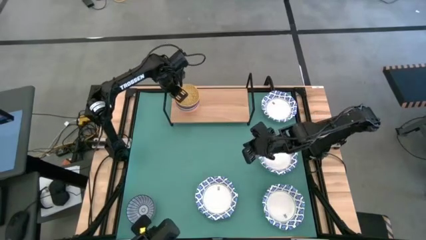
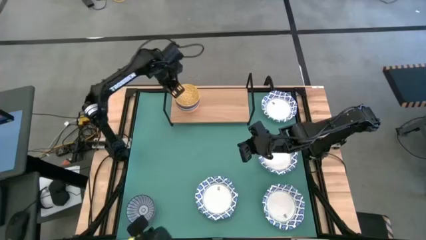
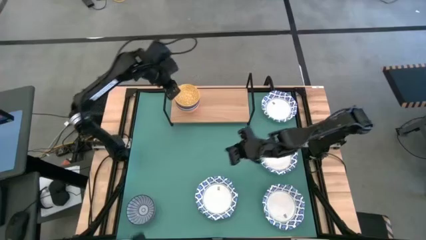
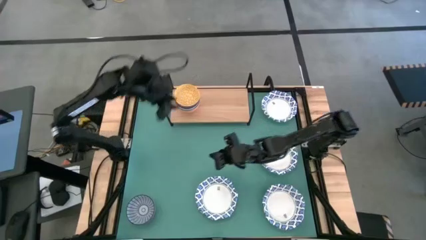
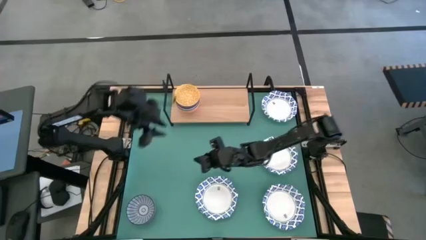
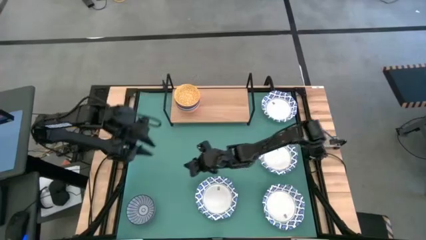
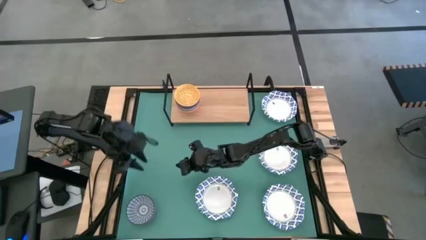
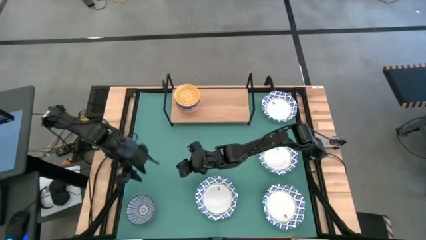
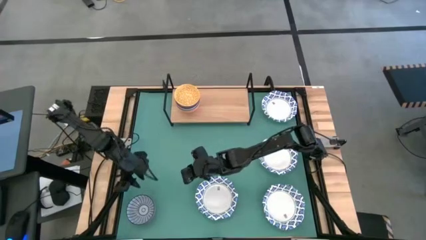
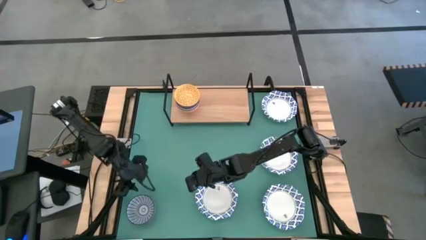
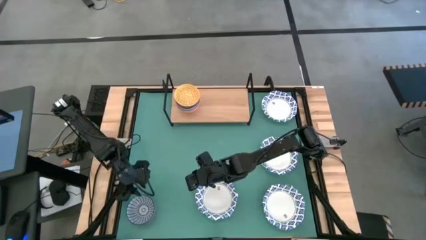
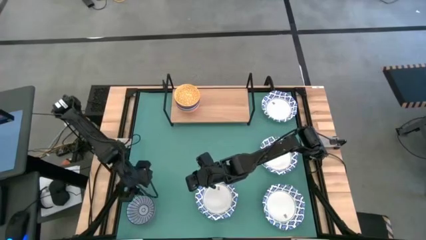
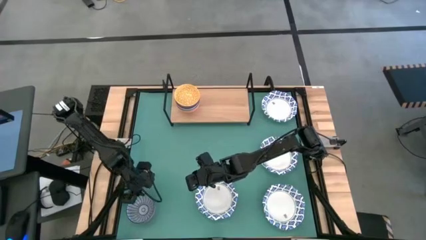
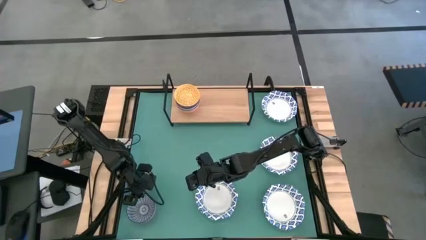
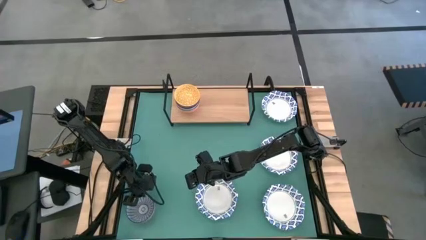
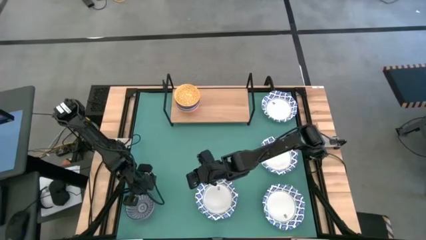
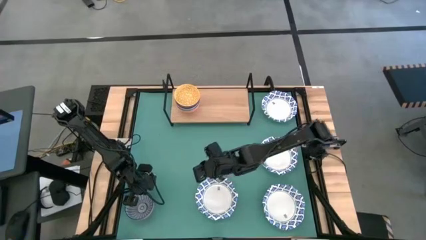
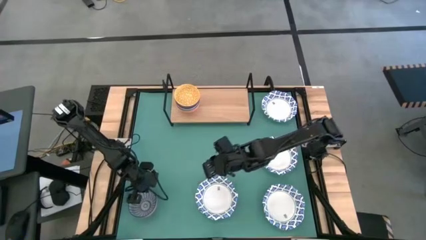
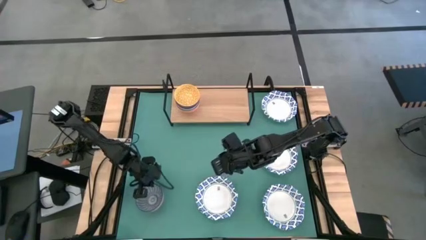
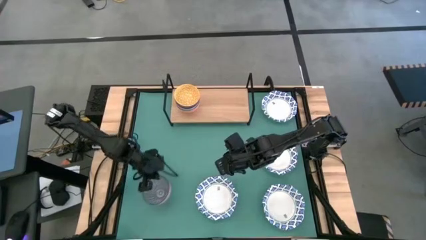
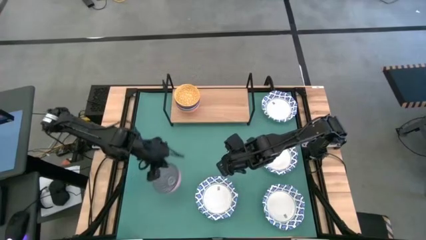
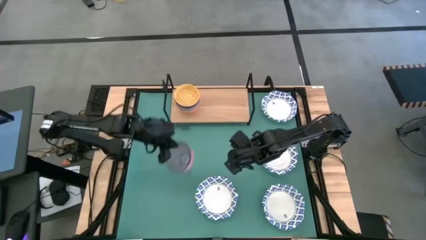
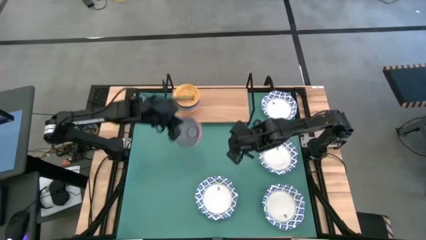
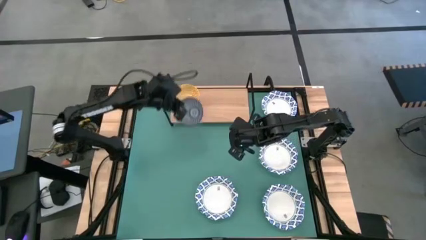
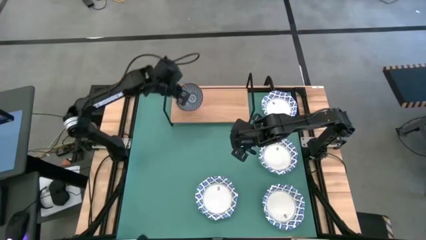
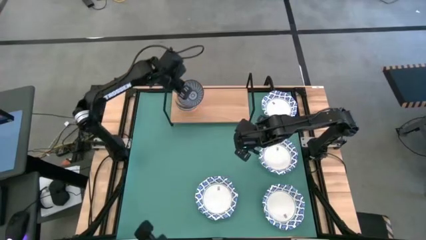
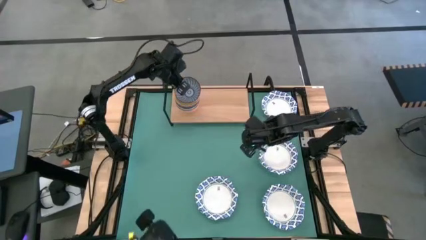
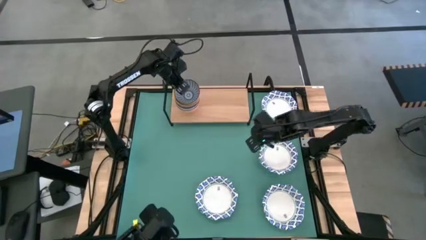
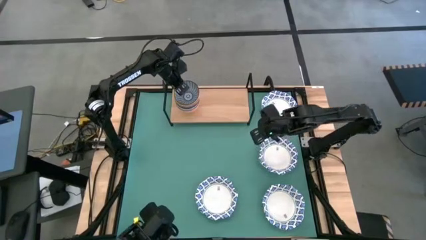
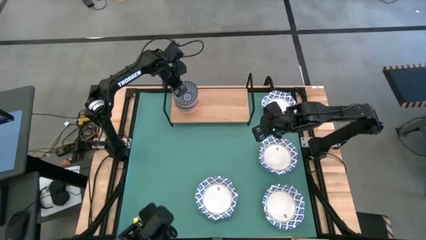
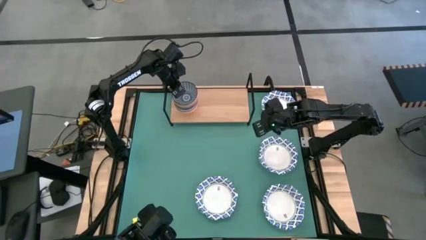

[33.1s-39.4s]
Task: Place and stack bowls onto a shelf
Stack the blue patterned bowl on top of the yellow bowl on the shelf

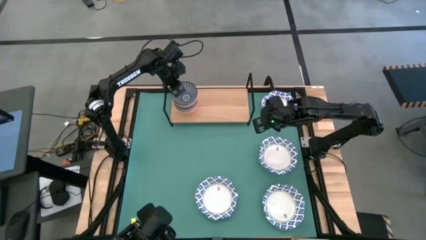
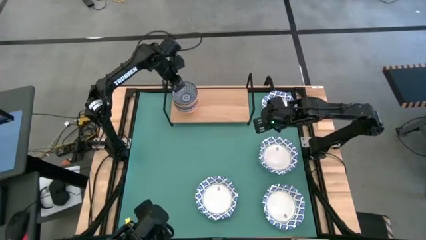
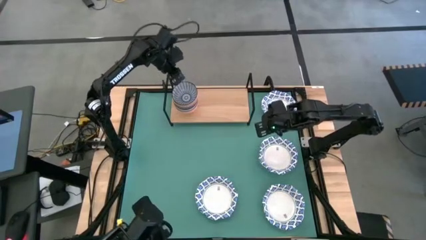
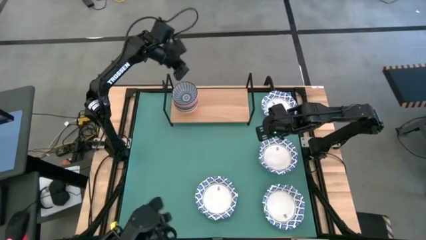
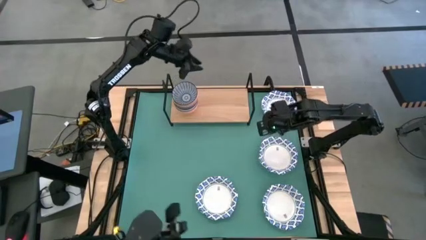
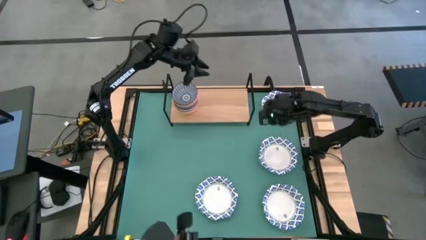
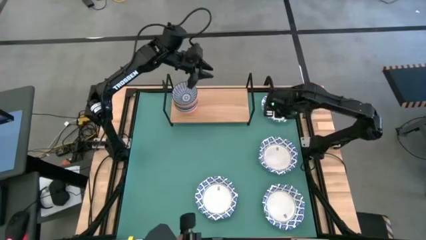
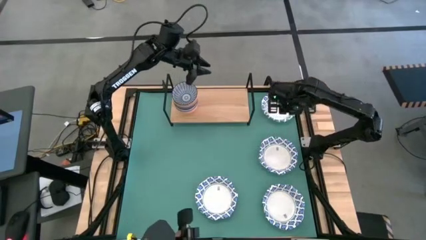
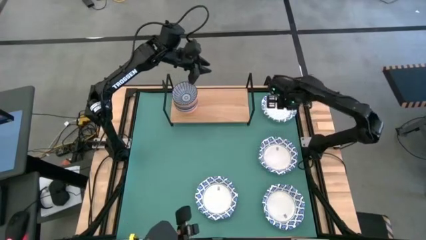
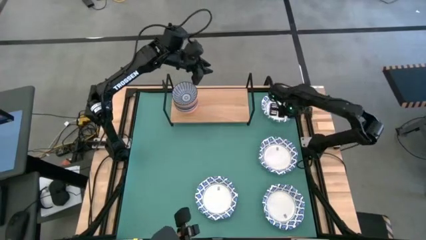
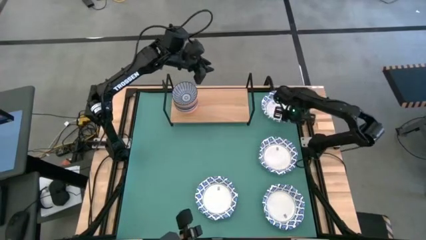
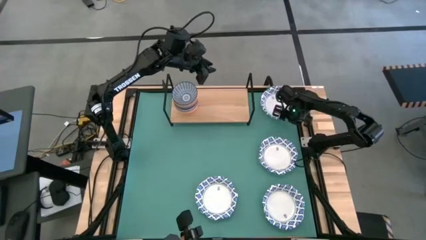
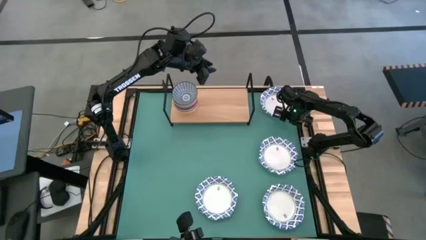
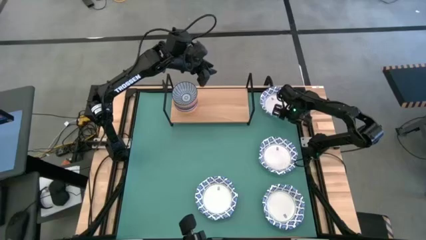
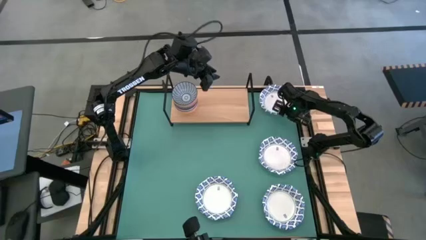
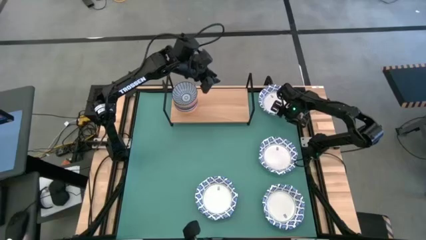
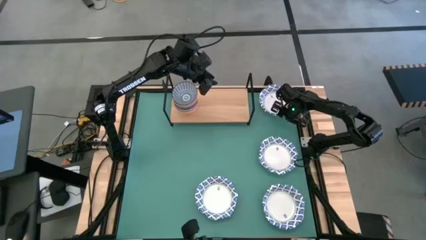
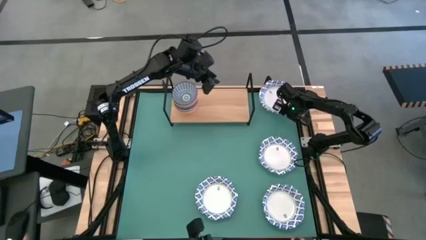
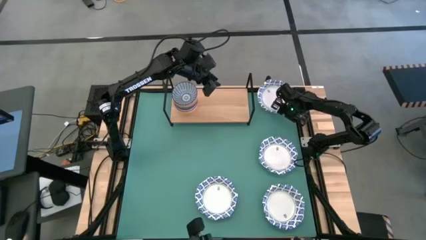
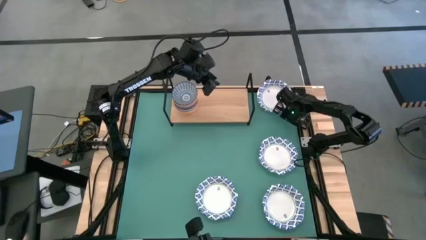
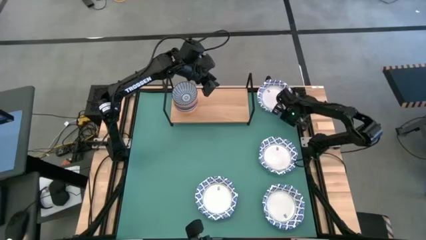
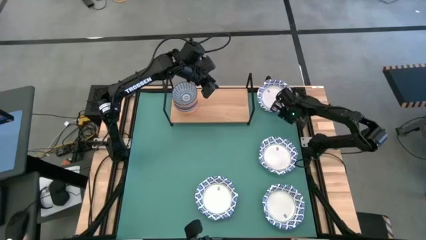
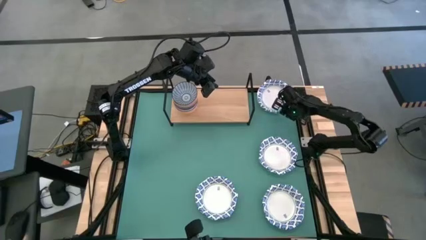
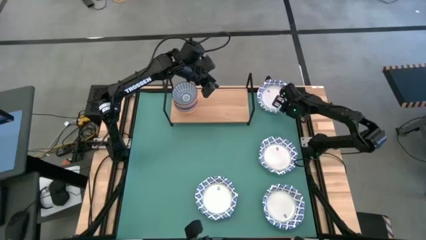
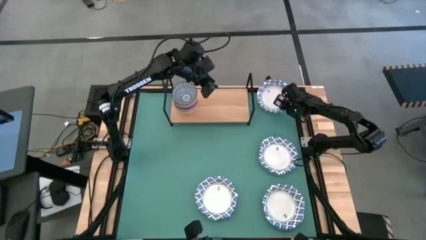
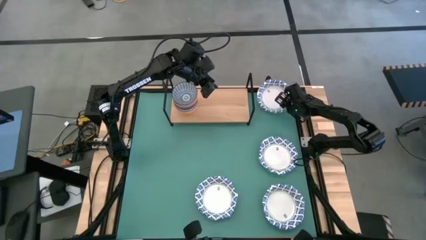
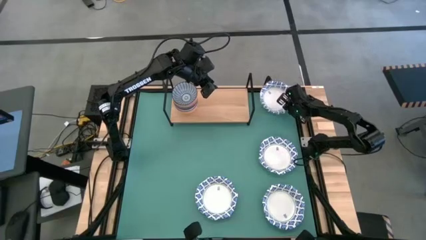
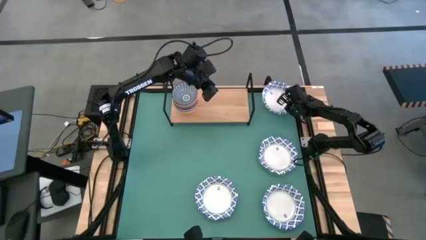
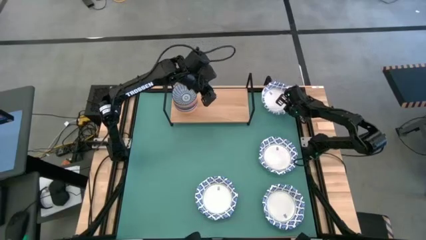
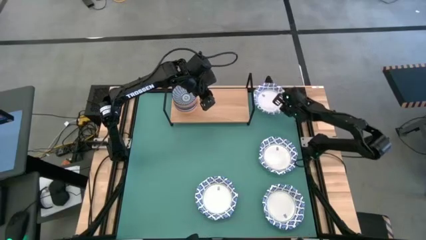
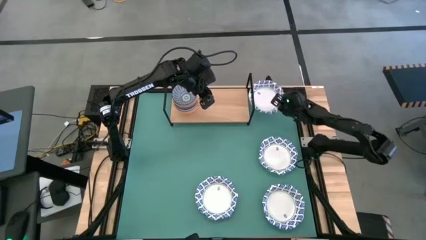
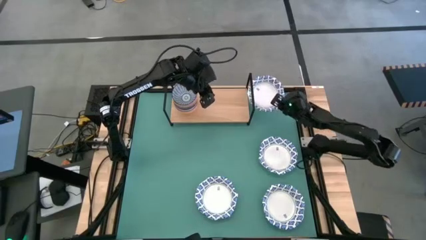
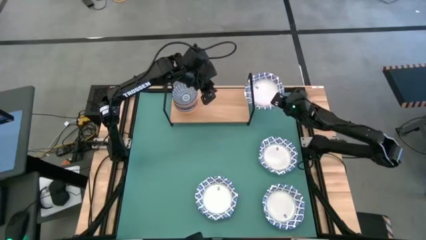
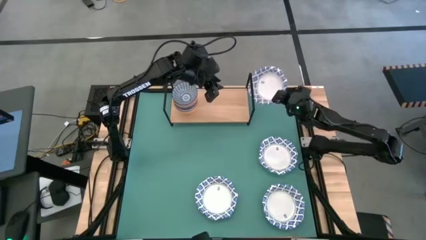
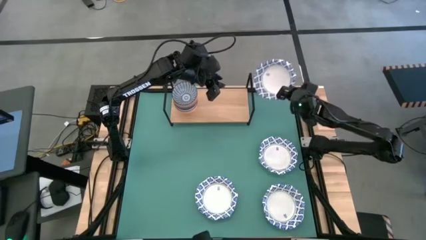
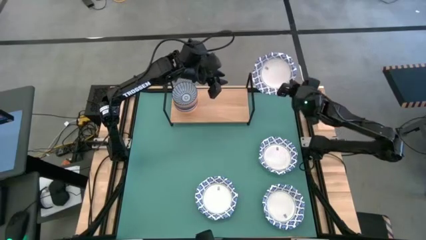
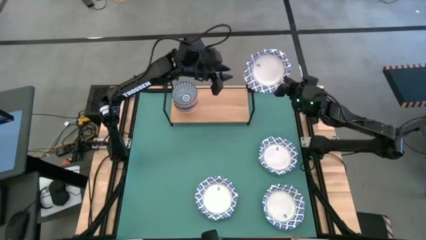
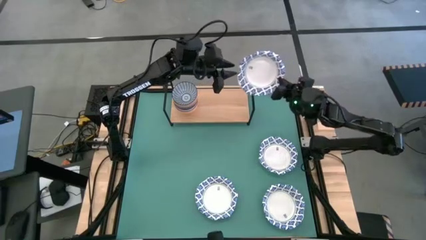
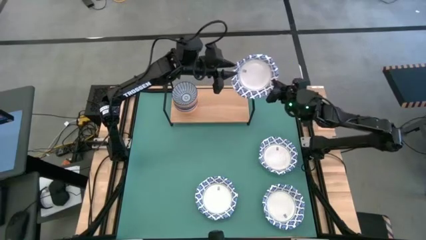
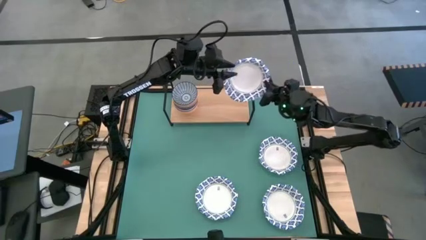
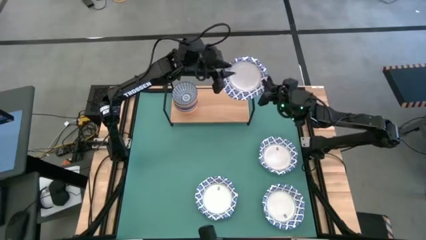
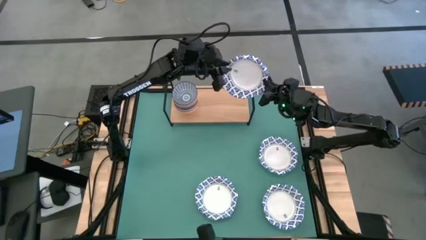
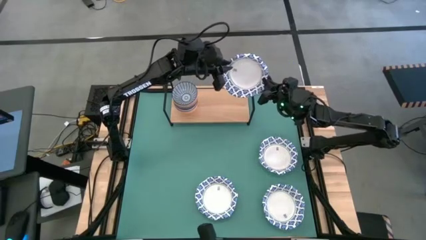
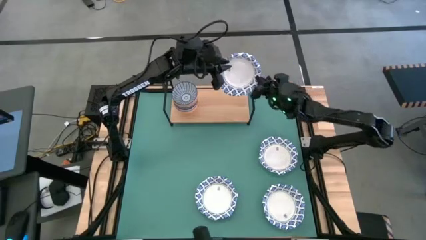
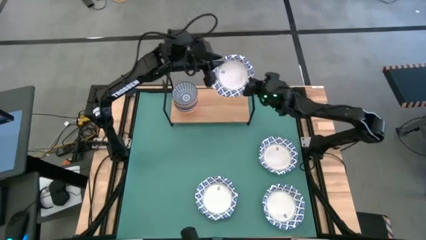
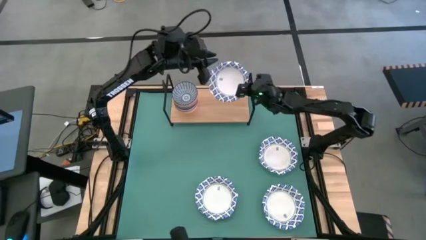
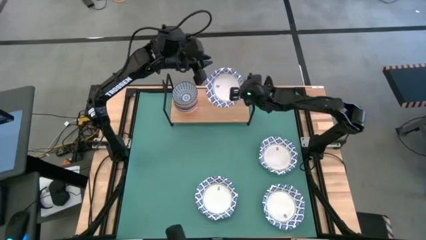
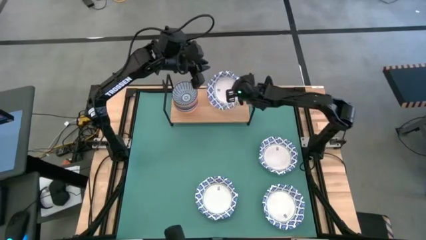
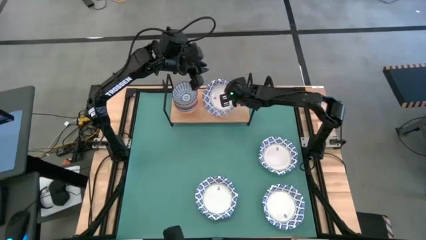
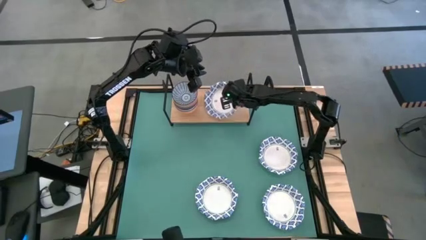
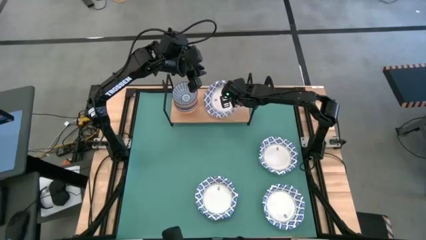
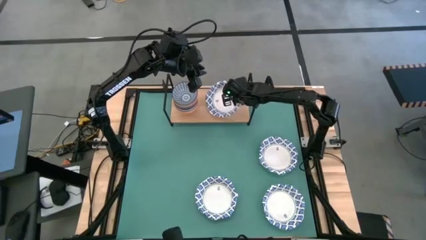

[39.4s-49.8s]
Put the white patterned bowl on the shelf
